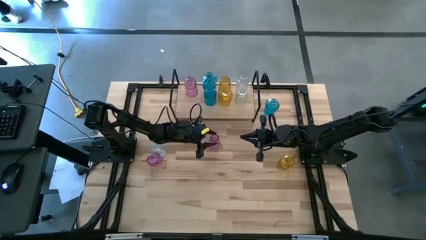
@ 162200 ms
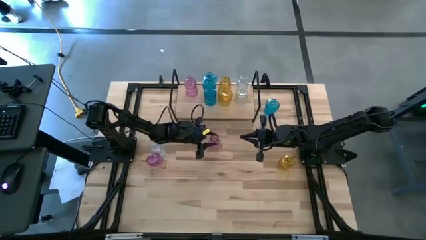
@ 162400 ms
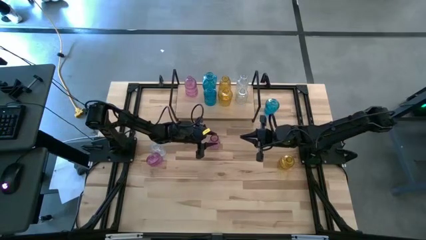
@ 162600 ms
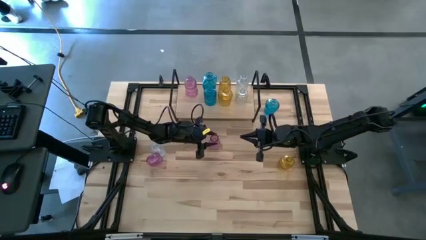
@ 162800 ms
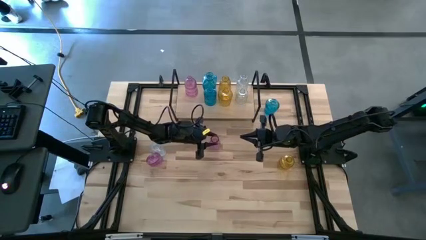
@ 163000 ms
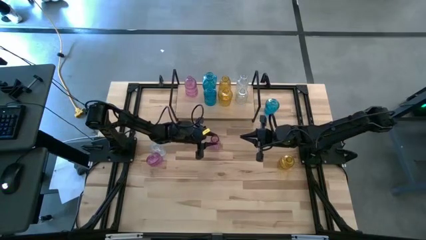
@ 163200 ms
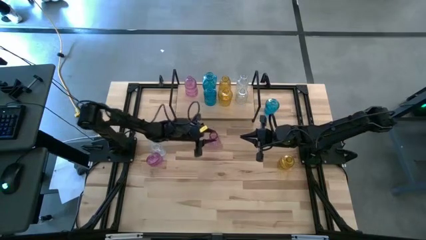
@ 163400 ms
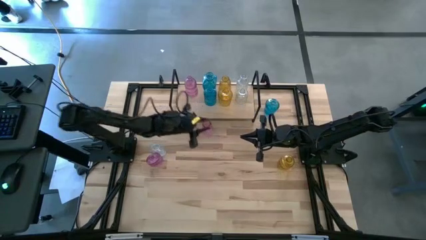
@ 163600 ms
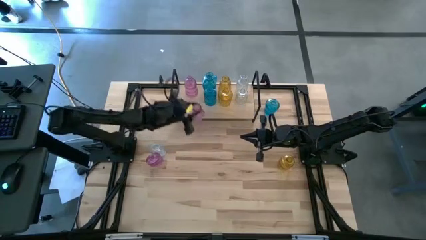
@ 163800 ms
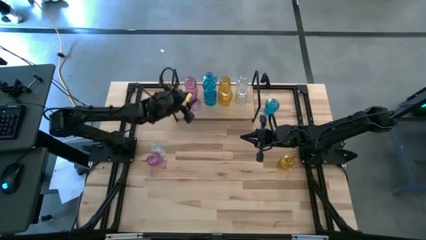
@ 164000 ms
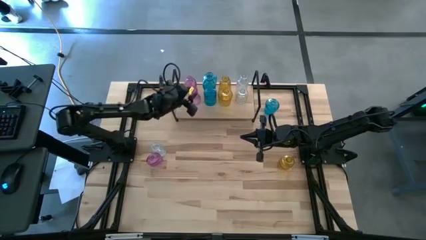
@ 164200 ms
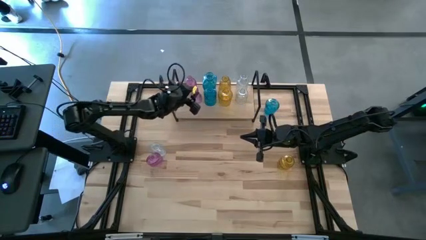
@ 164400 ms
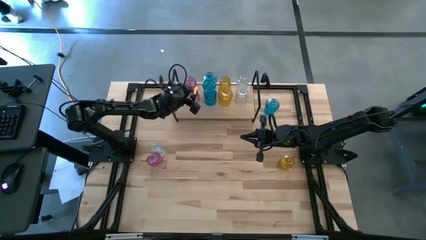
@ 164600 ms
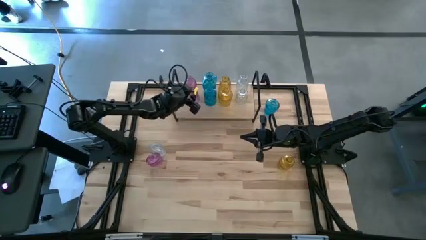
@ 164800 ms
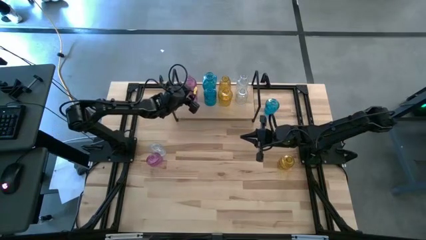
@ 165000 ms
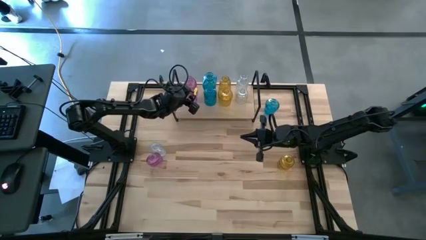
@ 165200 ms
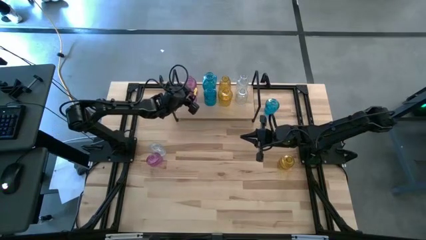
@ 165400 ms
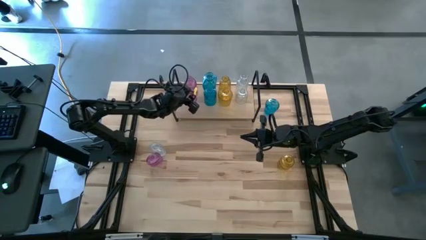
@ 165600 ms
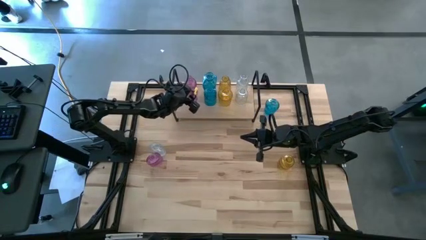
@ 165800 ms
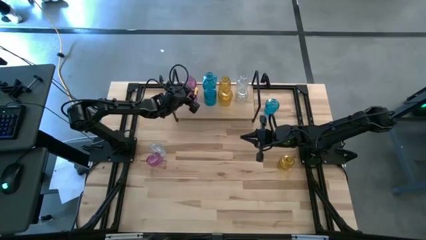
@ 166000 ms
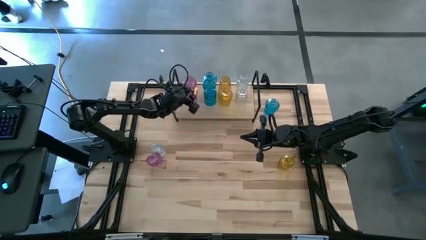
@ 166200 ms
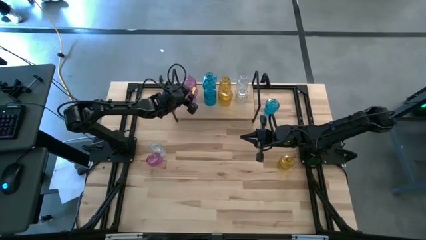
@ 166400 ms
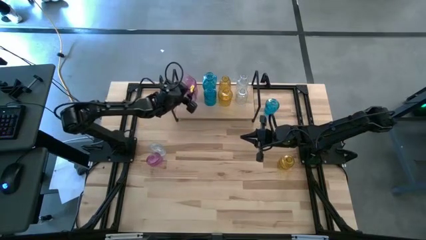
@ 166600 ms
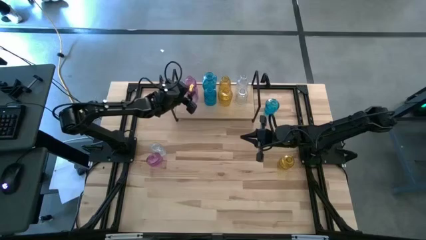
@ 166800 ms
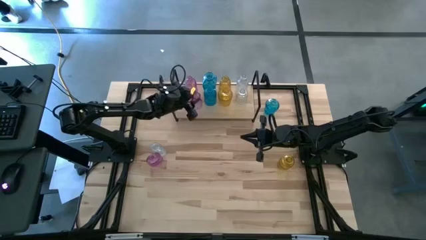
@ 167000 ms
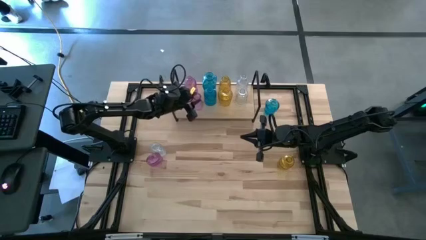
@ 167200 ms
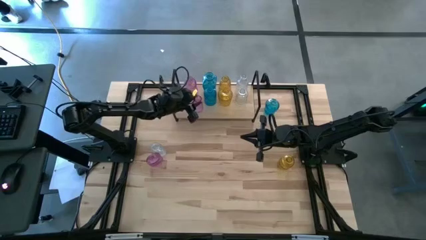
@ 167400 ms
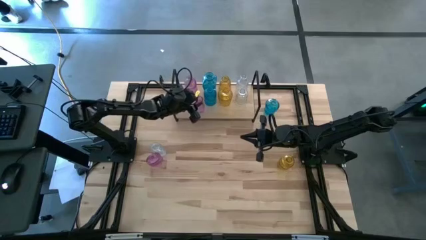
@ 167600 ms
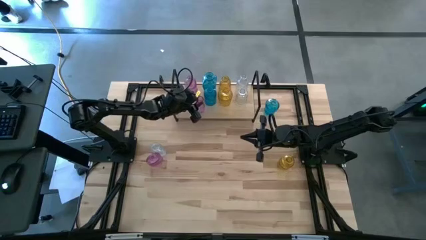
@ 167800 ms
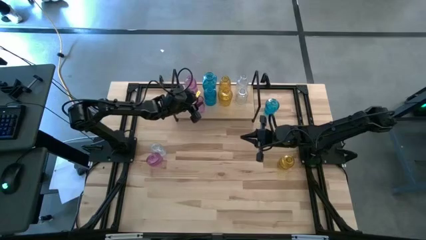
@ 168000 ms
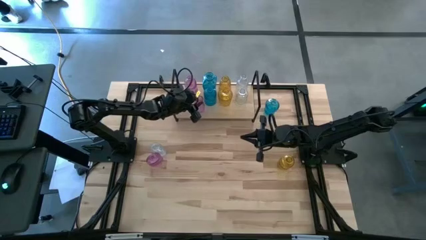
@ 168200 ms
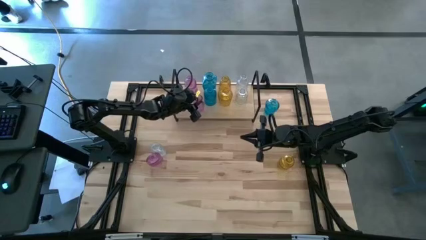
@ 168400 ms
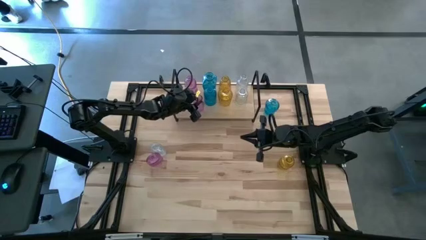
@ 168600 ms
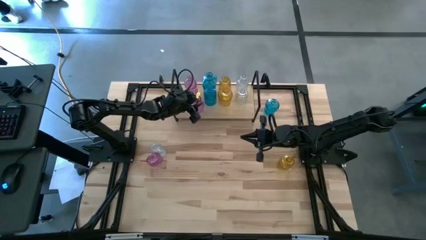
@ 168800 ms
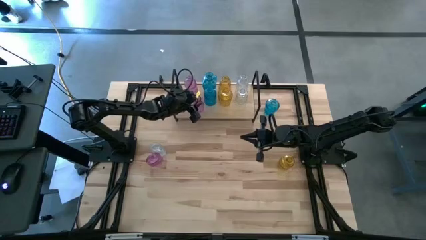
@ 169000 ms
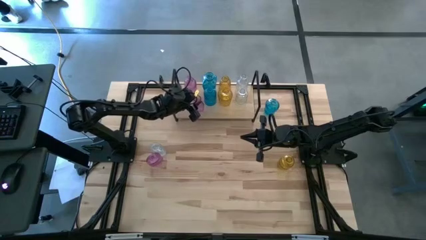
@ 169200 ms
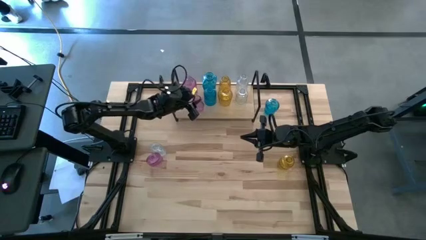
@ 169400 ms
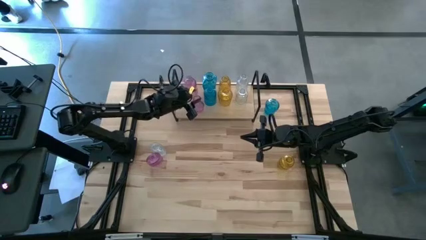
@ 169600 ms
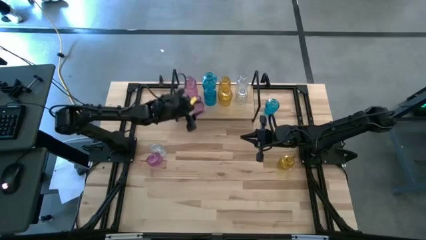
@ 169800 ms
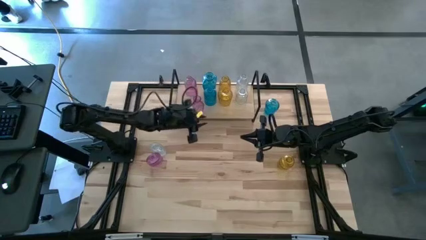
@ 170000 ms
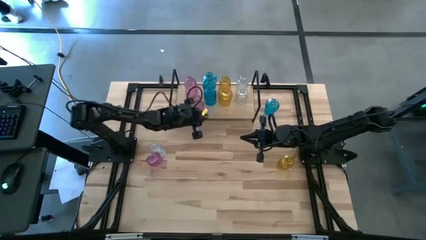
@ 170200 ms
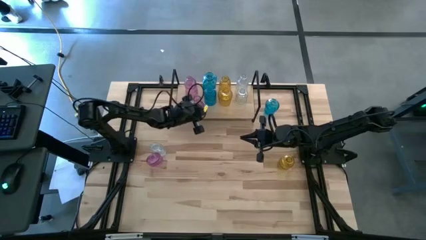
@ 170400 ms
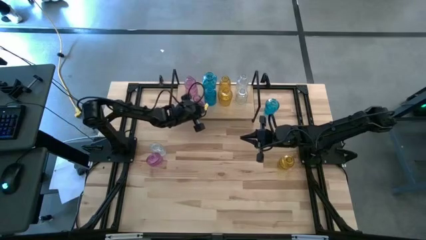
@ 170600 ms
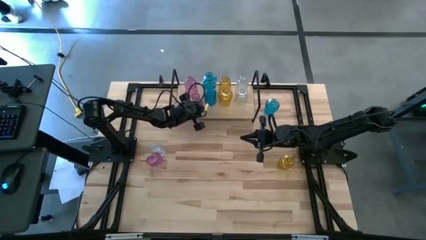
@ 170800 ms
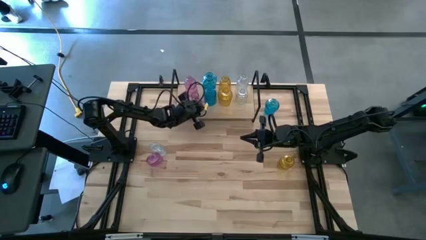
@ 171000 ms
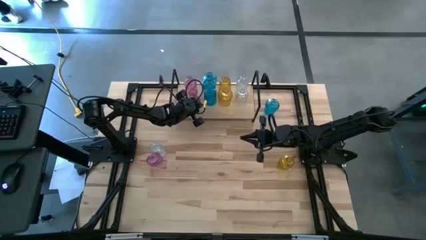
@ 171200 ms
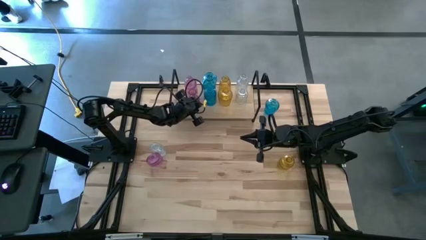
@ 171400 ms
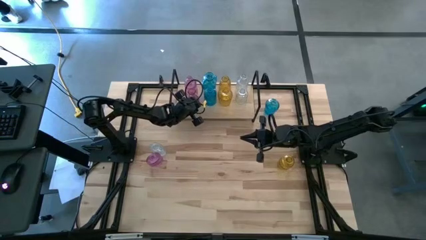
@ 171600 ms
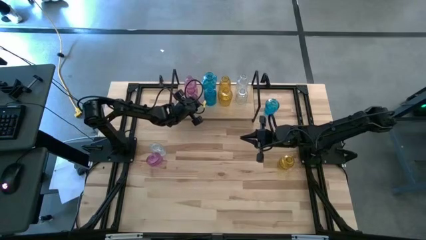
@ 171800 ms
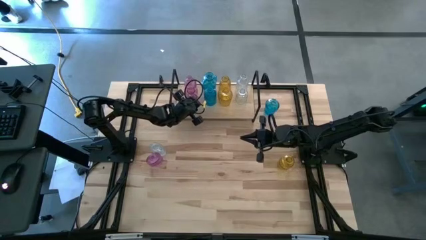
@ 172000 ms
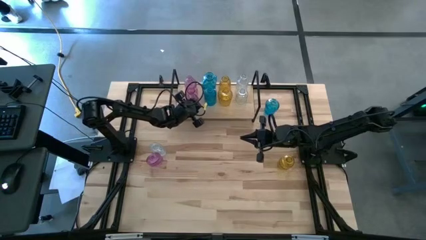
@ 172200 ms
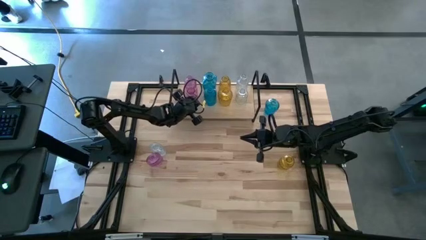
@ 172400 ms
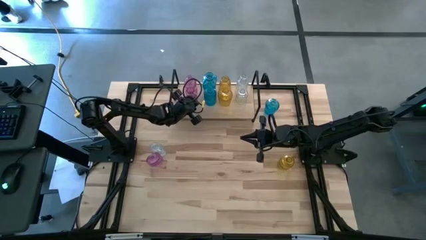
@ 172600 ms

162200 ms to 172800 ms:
Task: sort vases onto shelf
Put the bottom pink vase on the shelf aligned with the pink vase

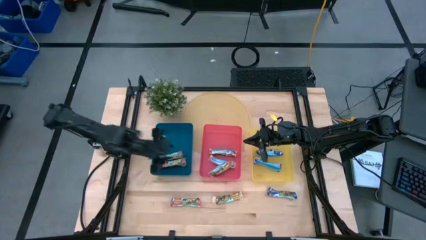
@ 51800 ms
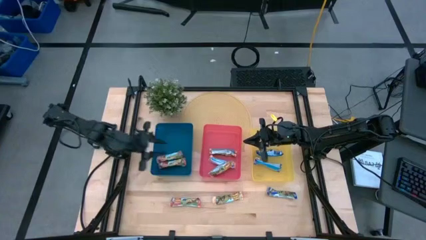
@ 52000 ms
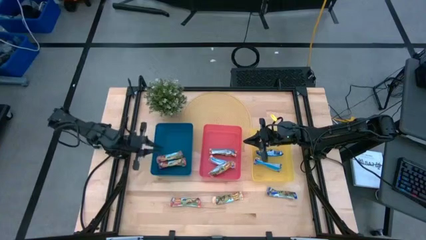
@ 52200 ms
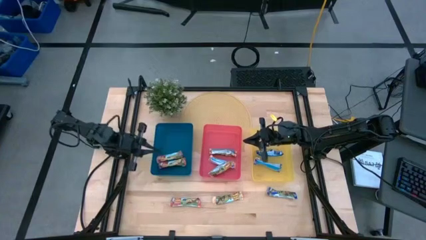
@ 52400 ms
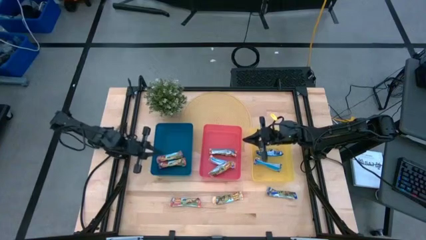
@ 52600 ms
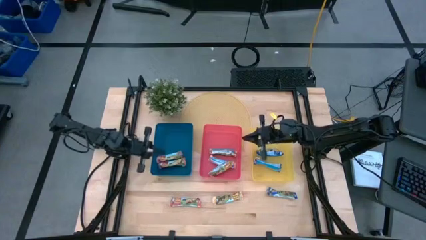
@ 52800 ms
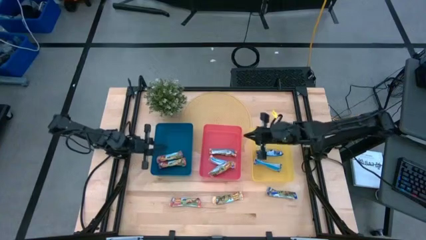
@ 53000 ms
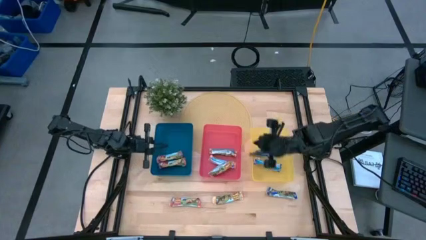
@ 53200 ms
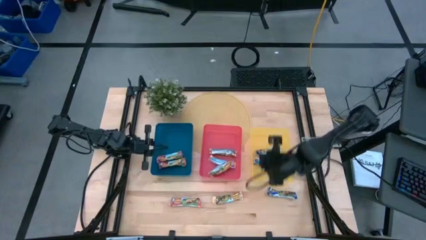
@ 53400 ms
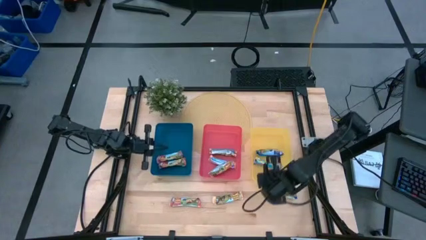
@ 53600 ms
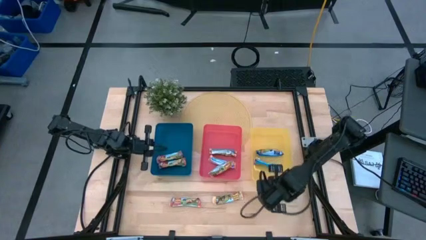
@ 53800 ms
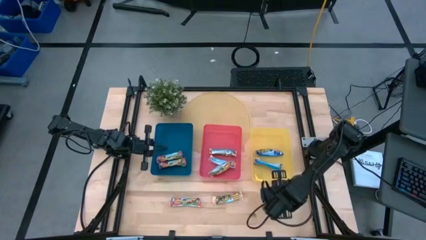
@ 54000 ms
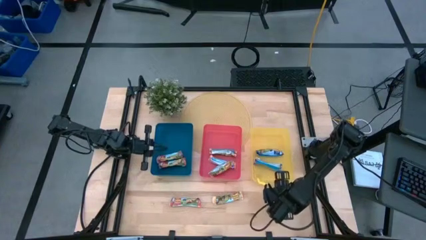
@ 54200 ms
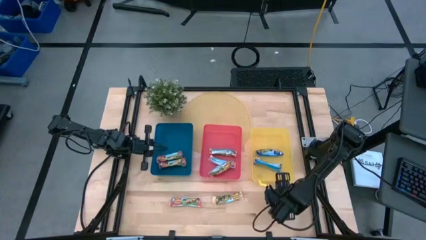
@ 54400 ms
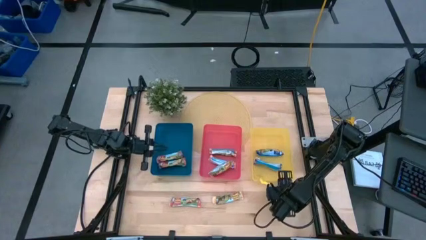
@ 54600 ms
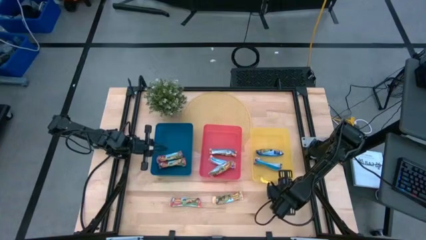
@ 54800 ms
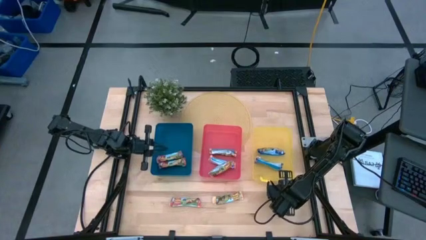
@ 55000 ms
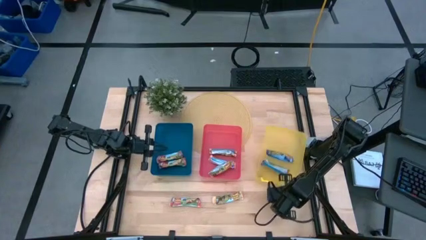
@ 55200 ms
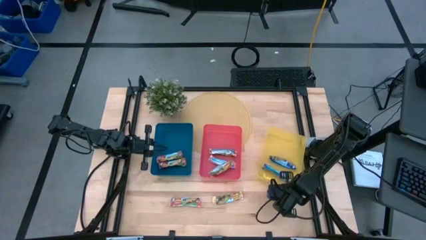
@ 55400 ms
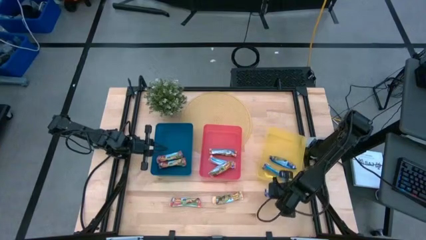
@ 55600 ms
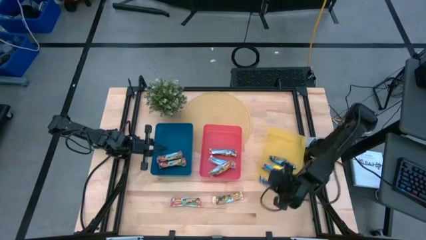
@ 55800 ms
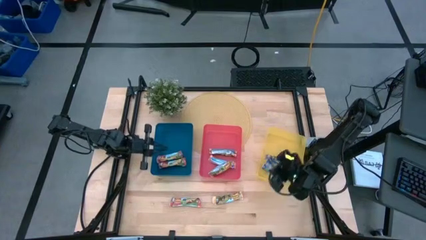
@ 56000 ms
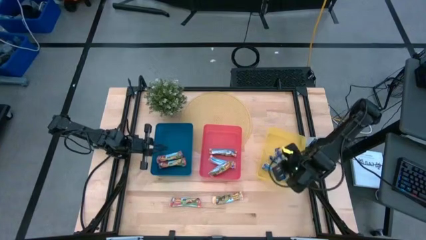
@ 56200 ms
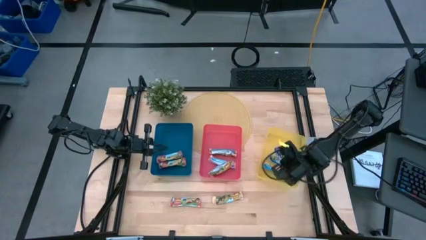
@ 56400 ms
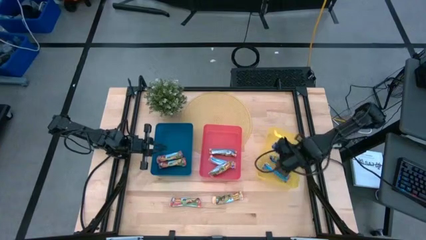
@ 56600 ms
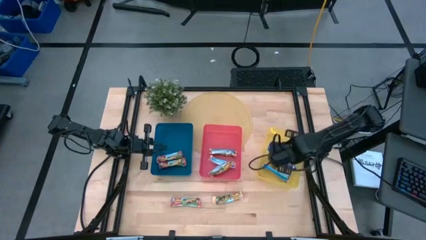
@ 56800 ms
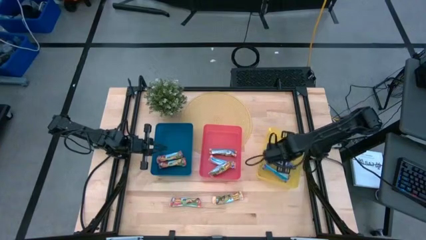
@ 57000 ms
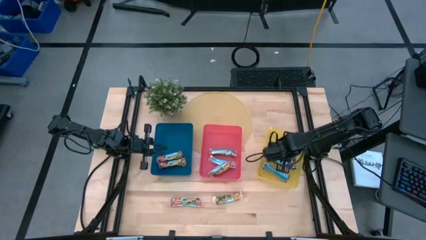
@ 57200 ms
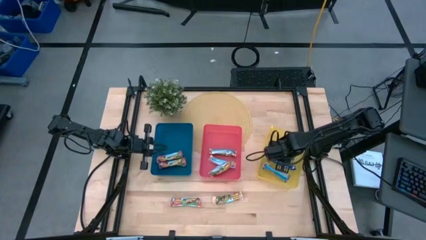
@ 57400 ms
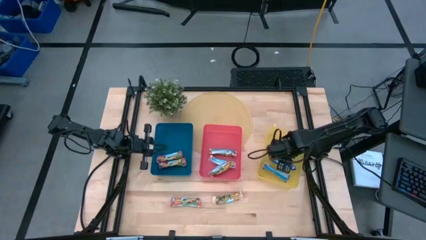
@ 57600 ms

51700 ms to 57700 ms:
Task: Pick and place Granola Bars by type
Put the blue granola bar into the yellow bin

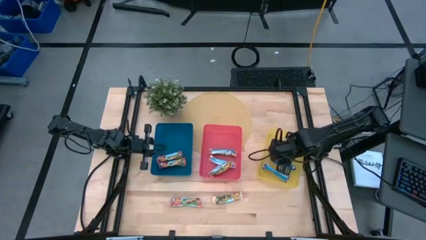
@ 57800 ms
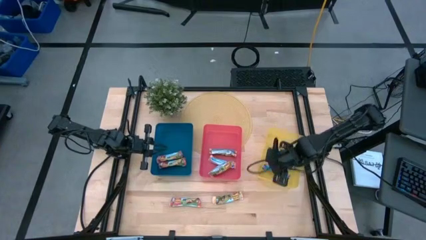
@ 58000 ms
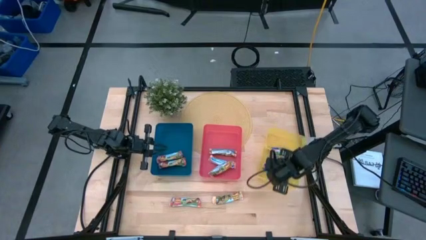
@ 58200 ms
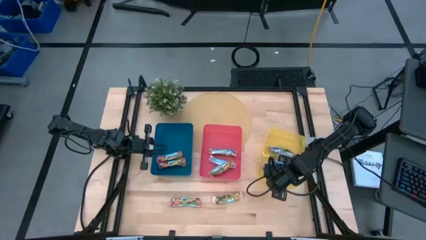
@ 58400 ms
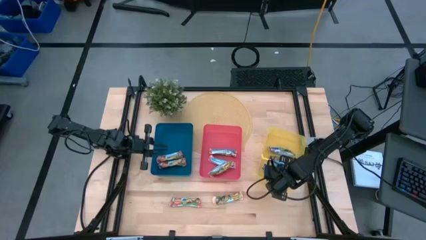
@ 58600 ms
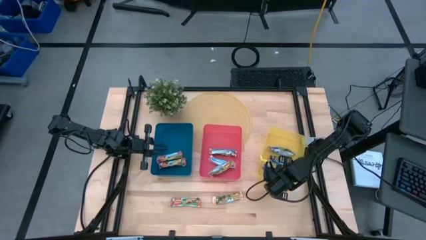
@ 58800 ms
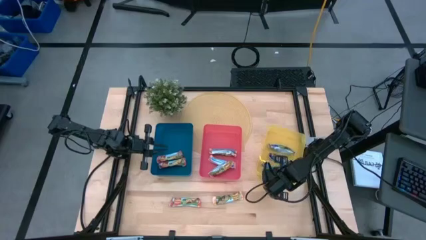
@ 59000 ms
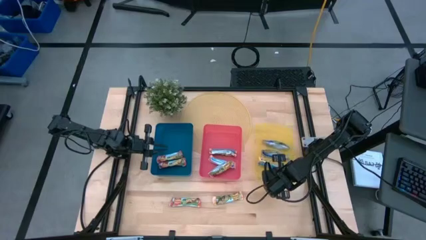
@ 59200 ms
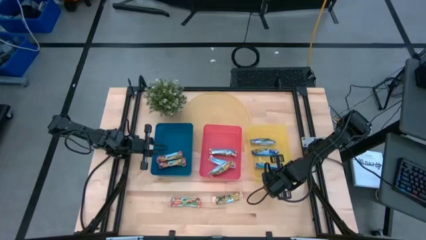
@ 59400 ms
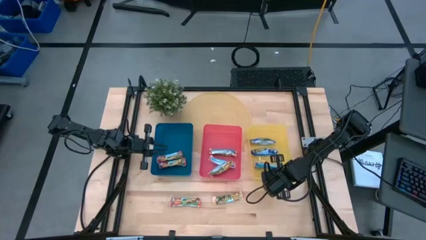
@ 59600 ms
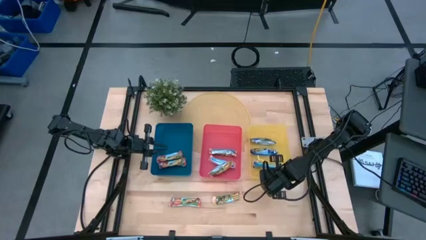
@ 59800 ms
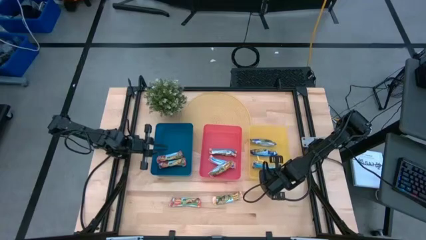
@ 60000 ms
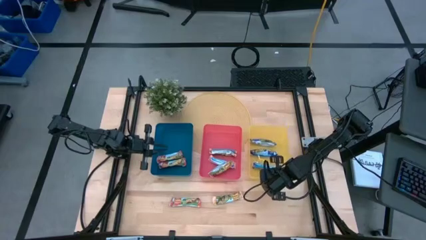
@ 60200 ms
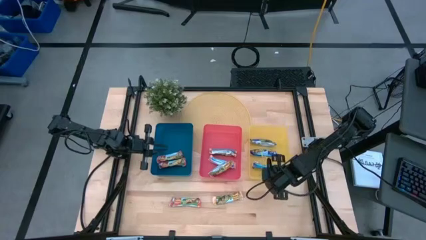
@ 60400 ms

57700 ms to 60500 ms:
Adjust the yellow bin
